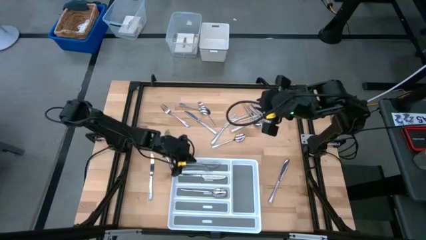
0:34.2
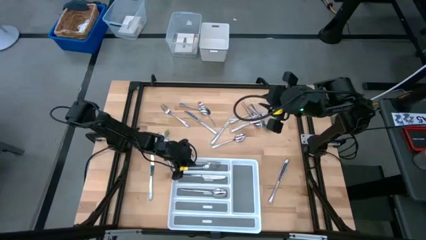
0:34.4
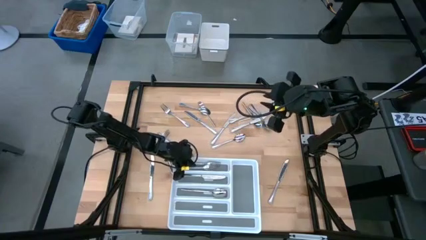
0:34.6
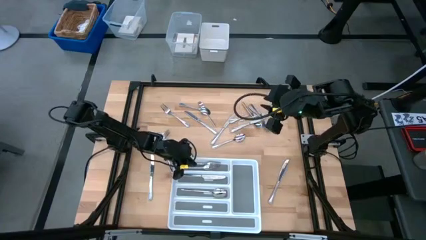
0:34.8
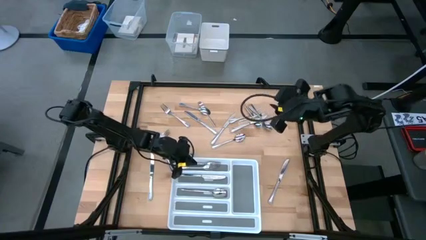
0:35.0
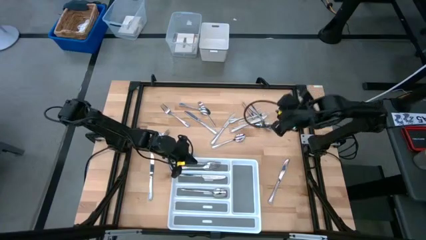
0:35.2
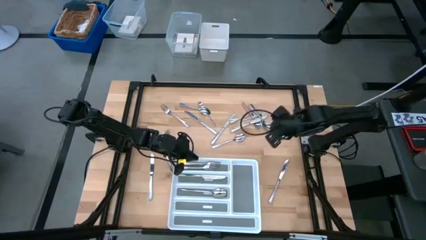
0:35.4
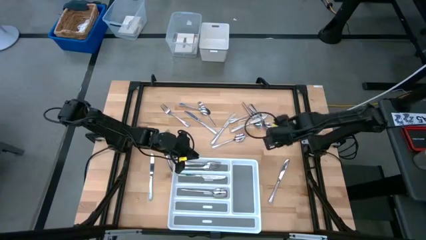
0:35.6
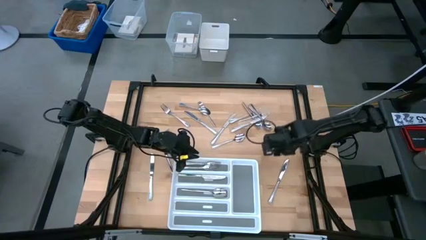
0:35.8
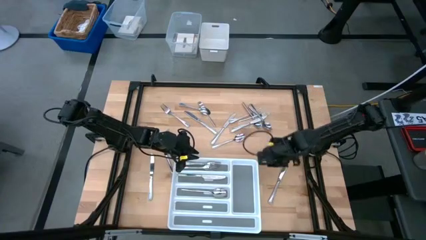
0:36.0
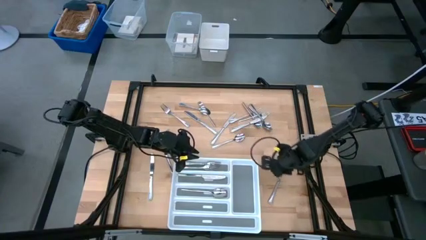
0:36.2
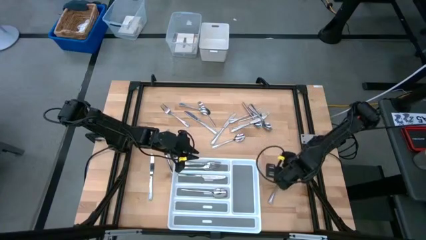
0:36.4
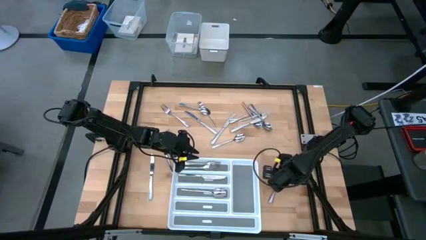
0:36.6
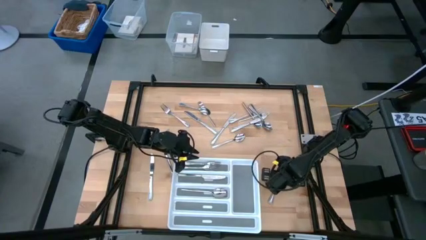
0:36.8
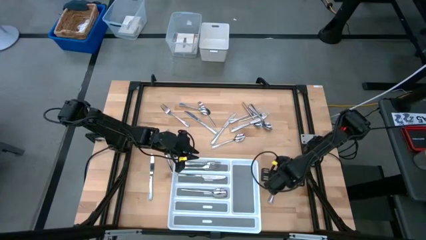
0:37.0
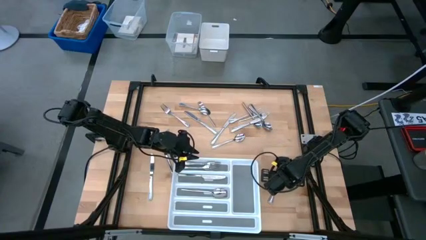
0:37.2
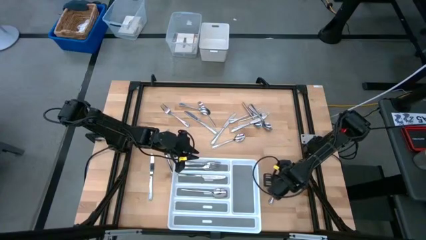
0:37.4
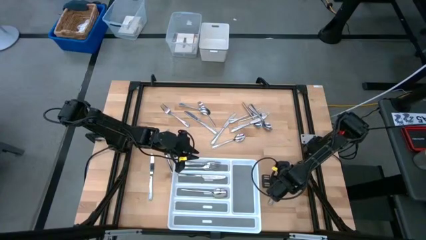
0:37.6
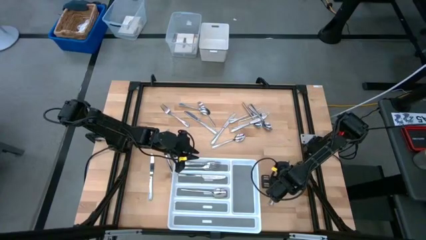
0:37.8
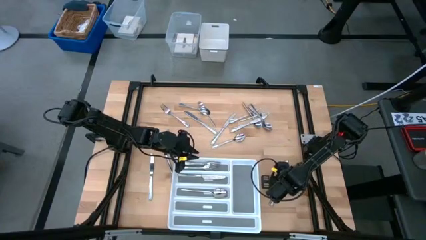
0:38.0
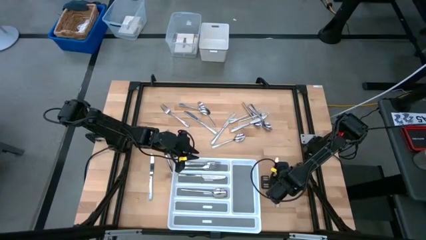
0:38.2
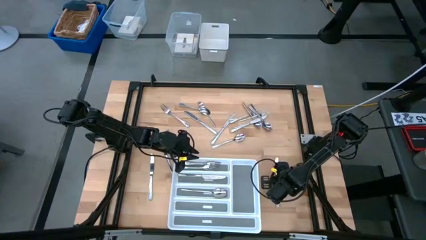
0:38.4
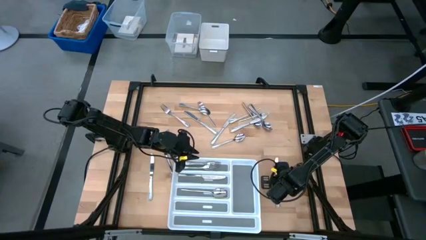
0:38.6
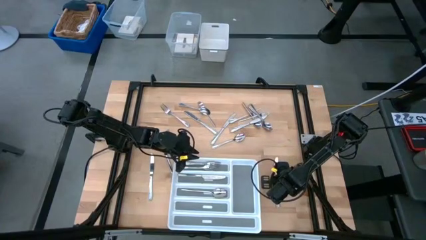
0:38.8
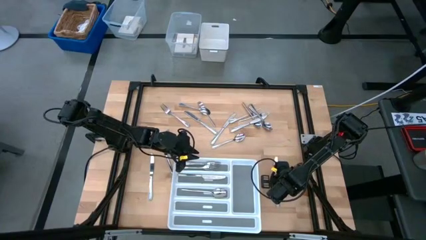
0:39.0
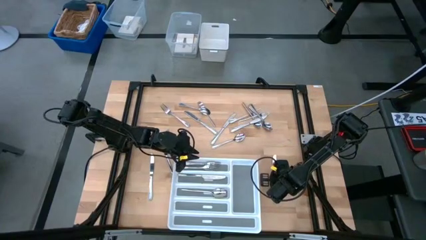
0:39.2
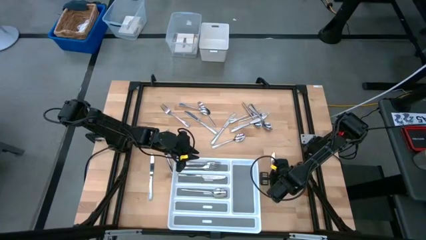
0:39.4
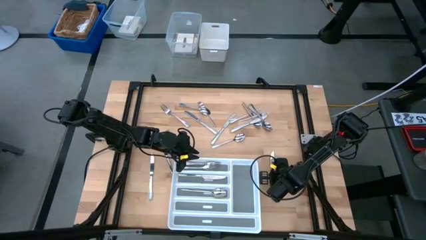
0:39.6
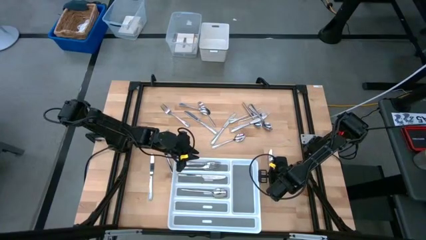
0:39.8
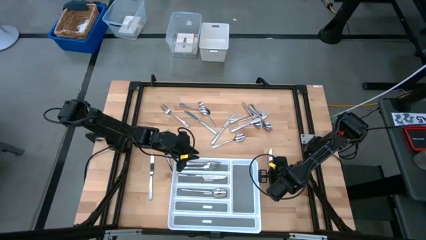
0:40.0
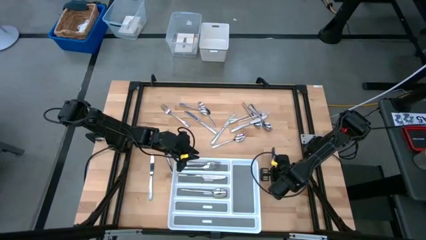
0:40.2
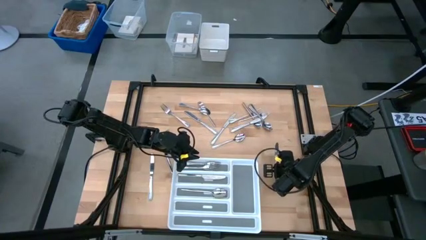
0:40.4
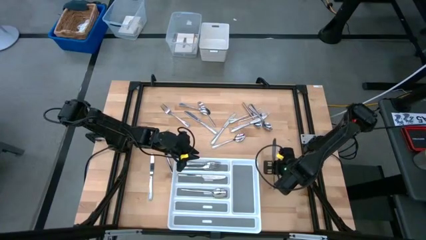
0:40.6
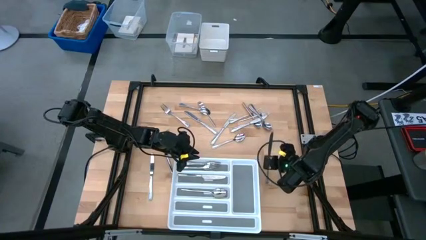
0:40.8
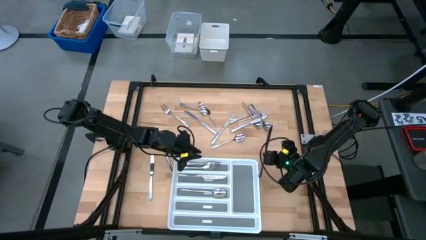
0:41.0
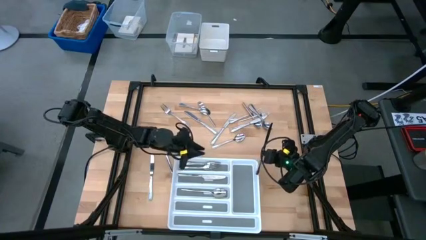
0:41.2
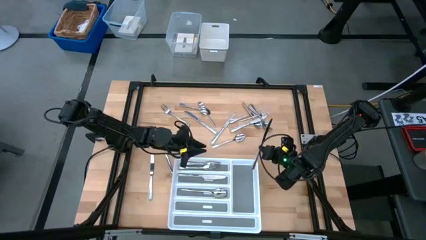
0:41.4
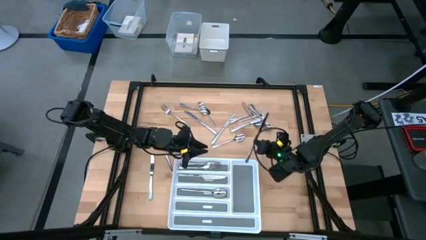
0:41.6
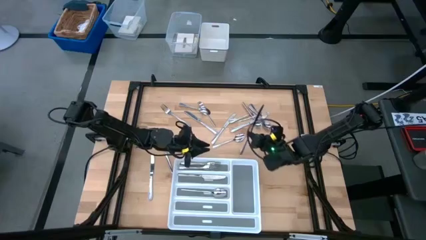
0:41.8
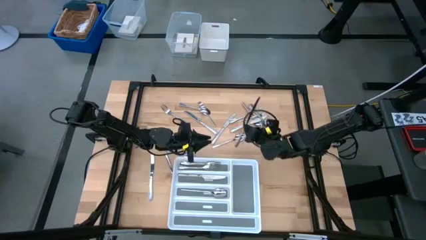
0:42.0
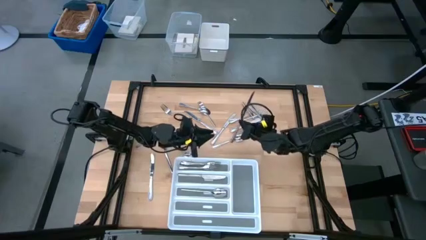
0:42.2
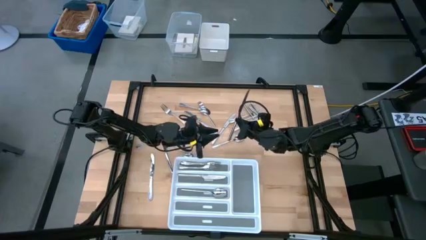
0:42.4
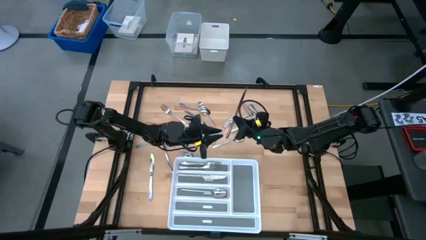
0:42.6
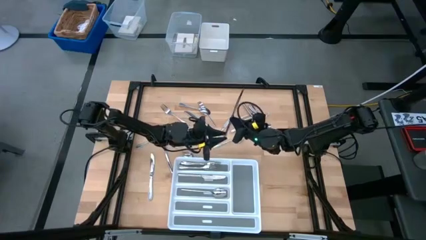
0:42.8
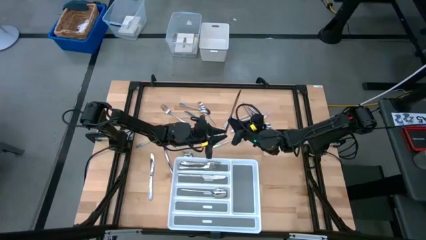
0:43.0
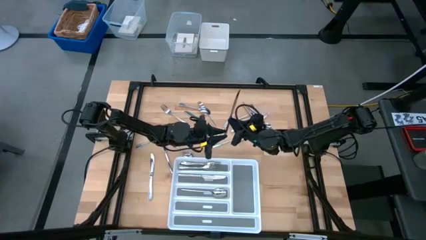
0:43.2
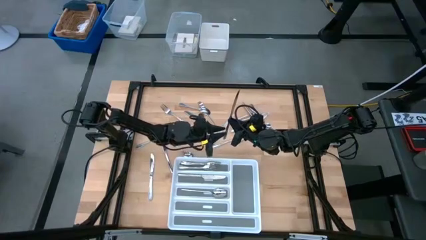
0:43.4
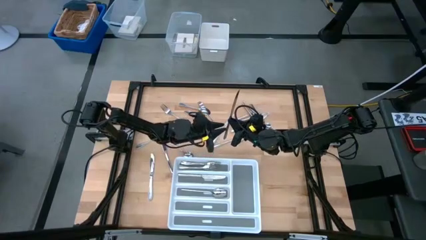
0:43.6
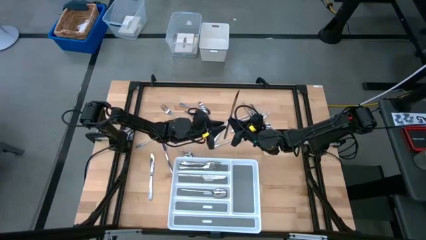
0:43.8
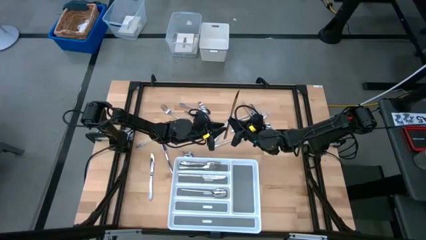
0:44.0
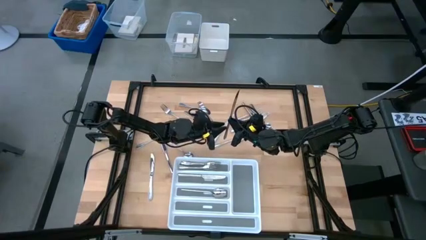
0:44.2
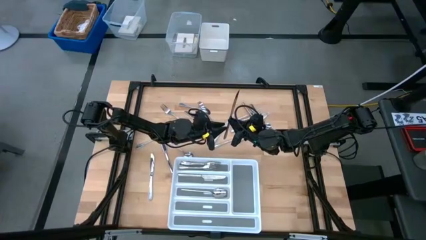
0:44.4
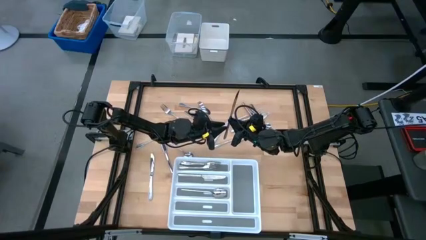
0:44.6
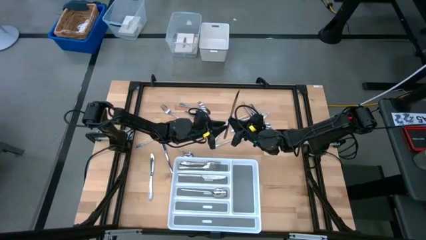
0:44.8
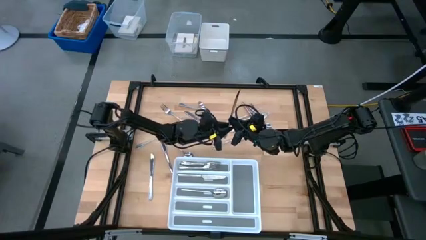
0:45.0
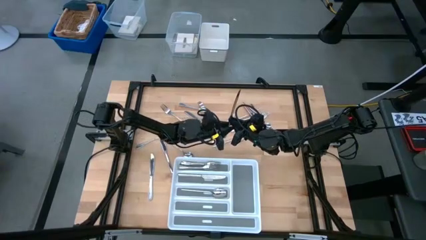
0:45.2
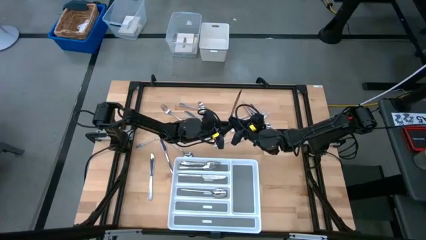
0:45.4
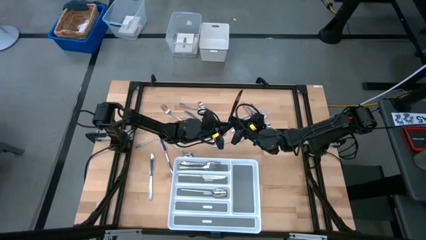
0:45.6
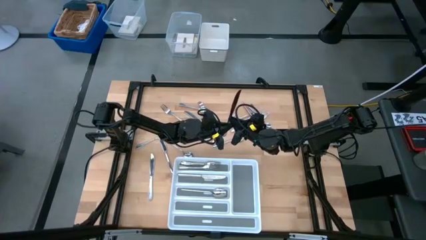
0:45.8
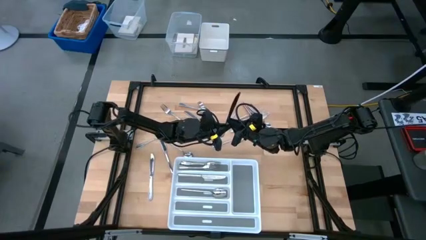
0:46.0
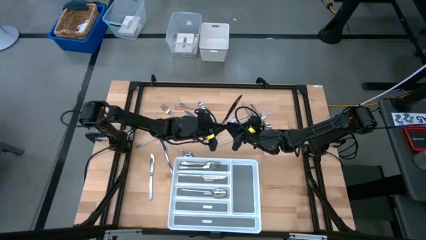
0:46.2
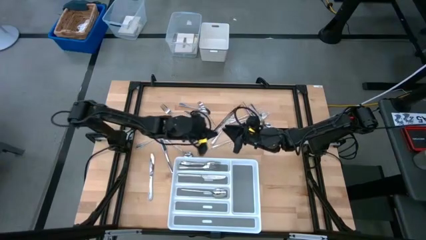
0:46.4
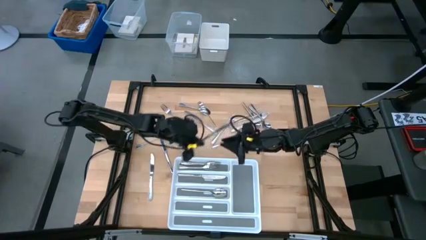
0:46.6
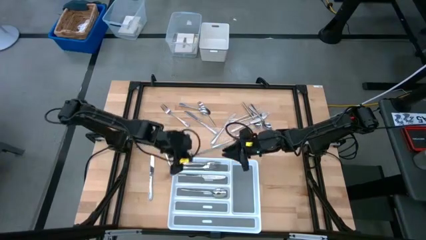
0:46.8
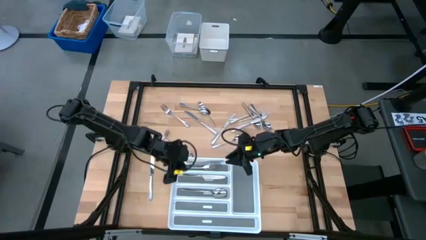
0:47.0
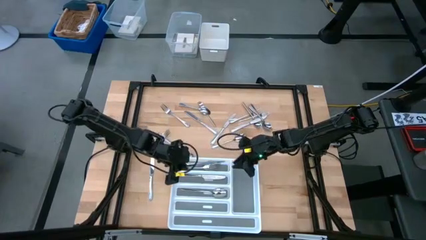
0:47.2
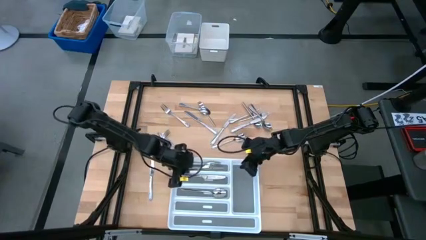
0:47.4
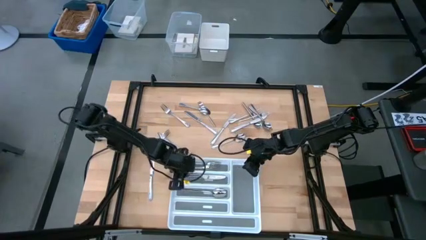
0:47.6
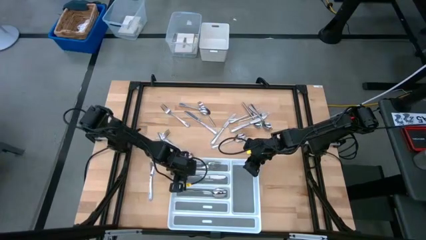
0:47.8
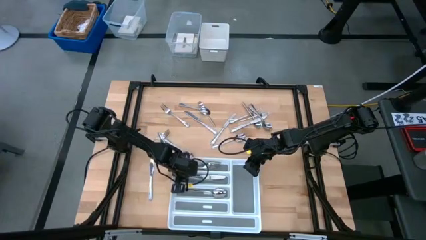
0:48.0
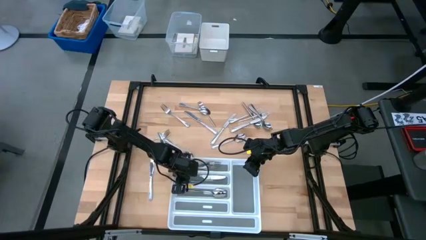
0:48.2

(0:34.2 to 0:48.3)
Task: Sort silverware
Put the silver knife into the middle section of the white silverware tray

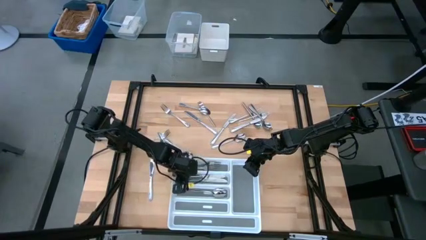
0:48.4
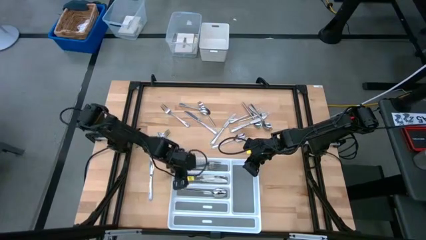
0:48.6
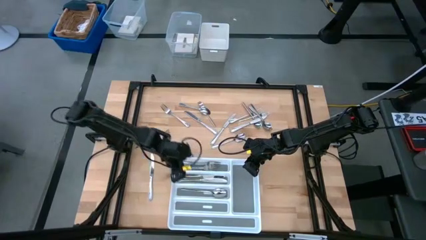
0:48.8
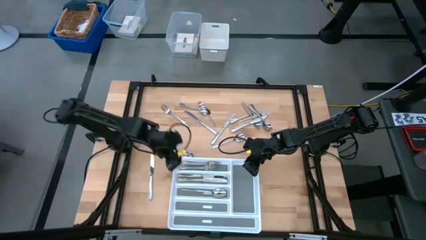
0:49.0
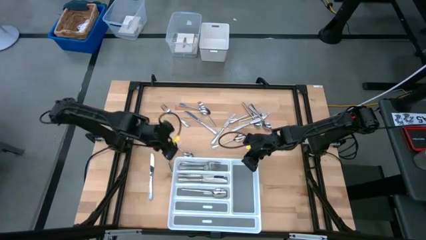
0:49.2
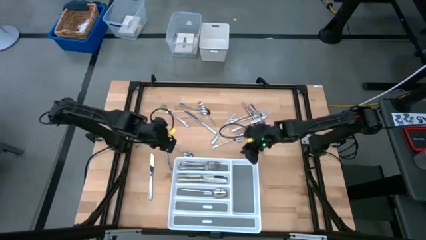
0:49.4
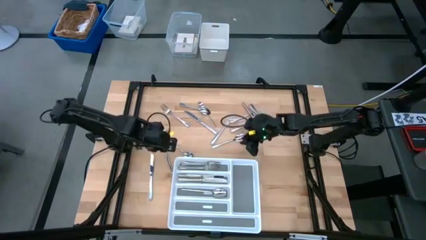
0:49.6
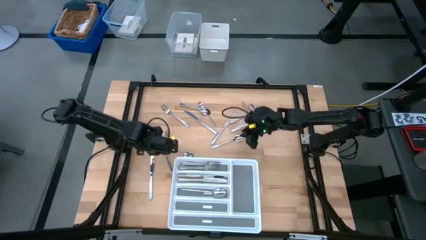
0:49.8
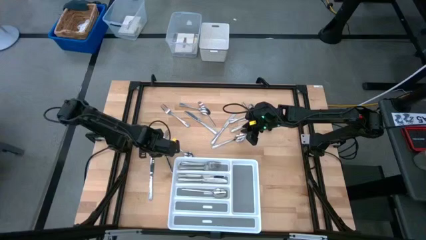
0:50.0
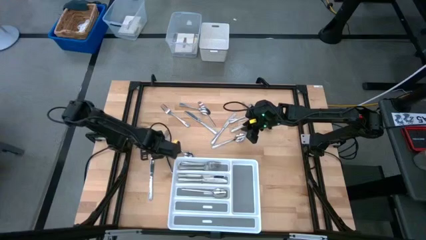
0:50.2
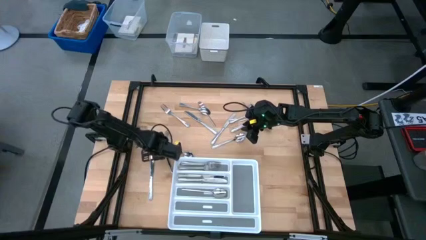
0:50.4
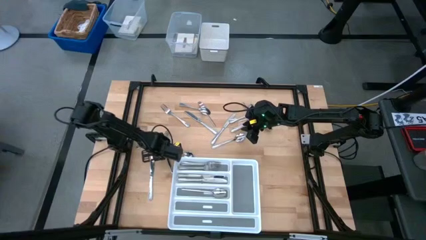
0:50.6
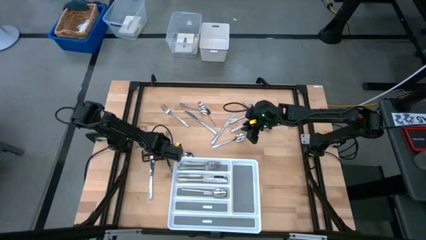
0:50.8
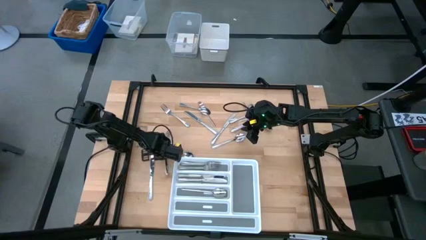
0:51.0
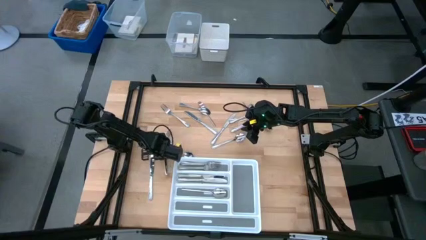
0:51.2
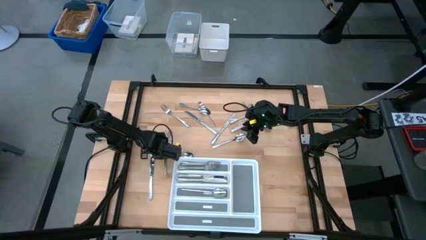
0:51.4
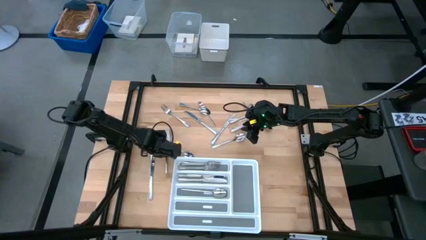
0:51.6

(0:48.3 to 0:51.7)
Put the silver knife into the middle section of the white silverware tray
